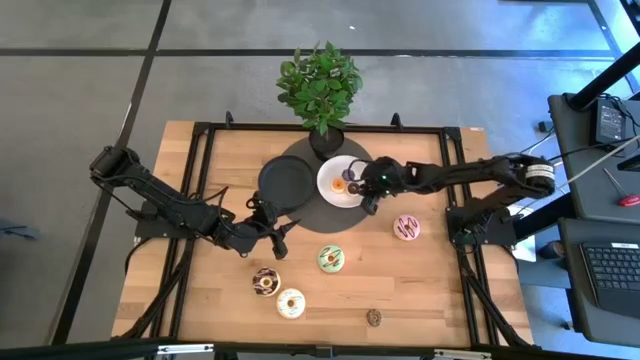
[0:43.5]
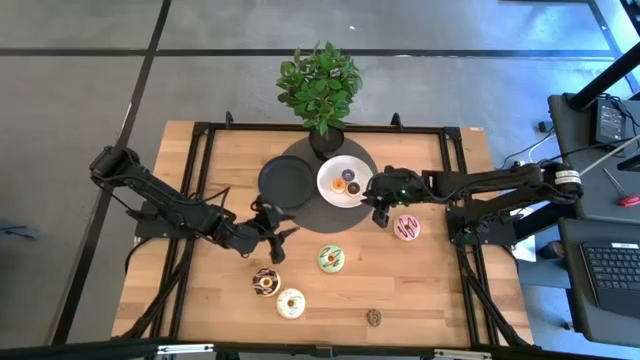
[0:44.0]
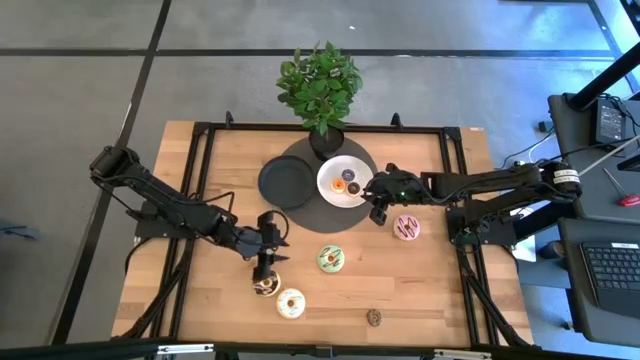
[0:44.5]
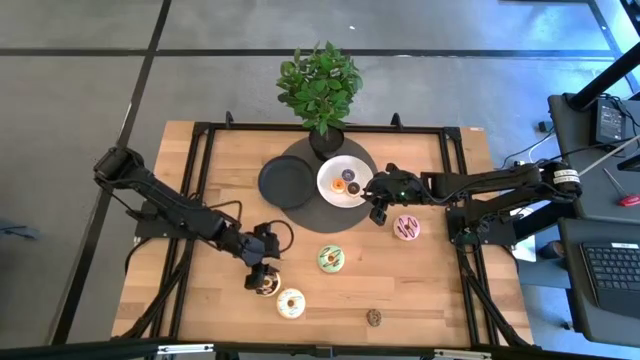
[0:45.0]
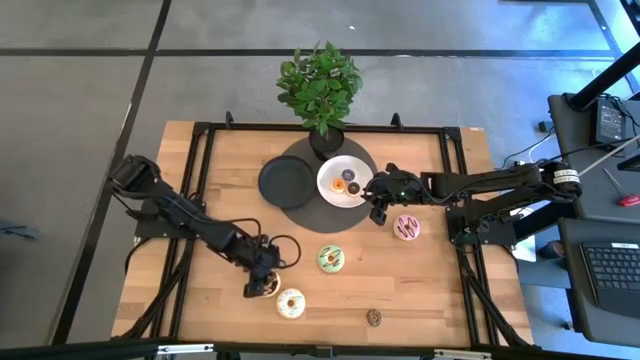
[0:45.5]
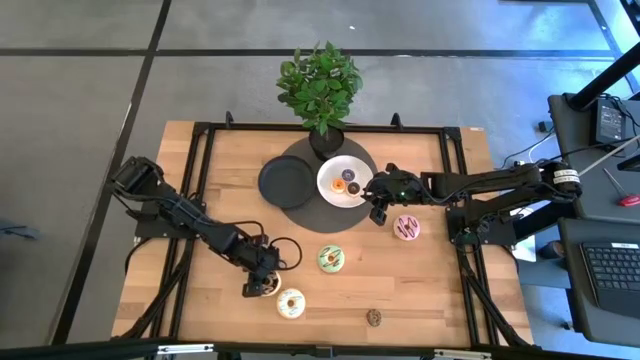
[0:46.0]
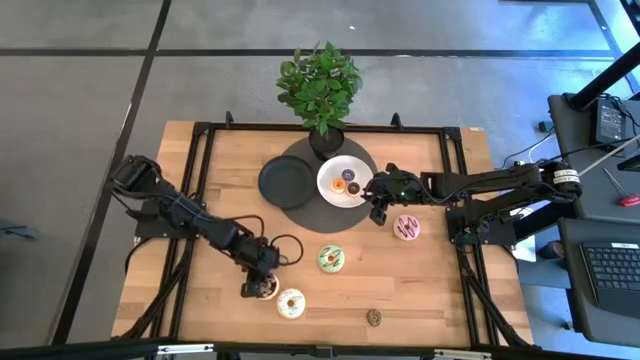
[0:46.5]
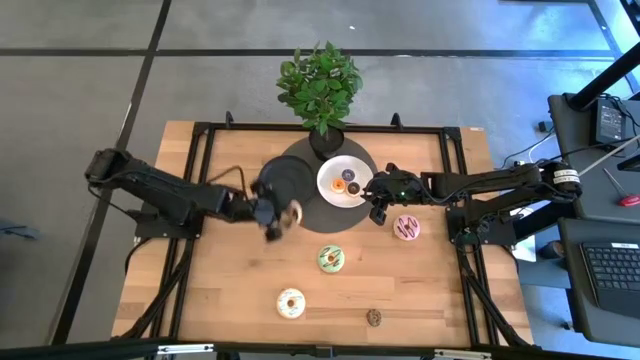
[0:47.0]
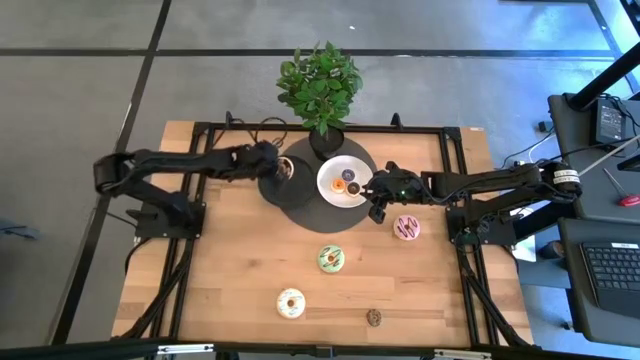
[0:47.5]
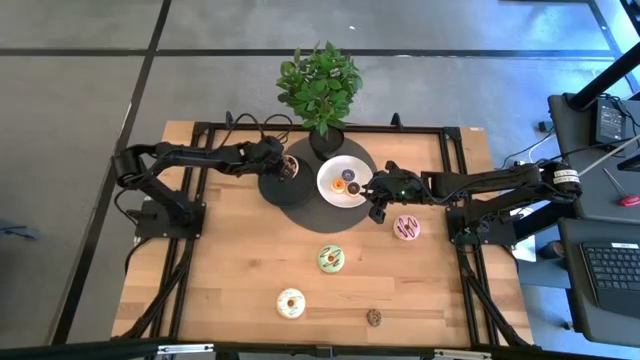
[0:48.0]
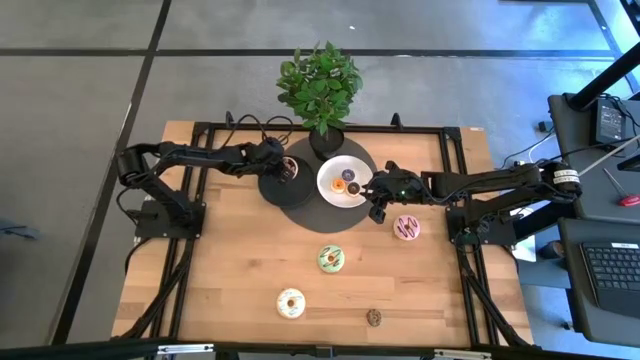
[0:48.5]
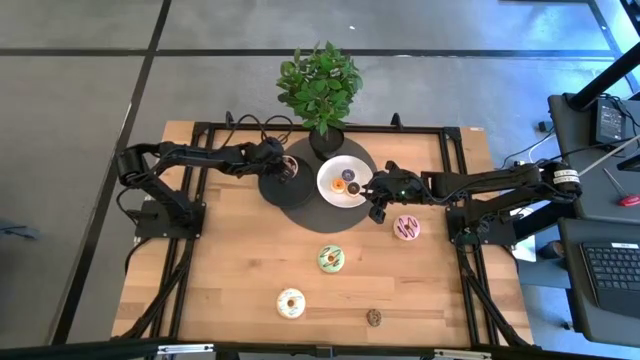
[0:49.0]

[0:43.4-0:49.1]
Task: Pick & Place donuts
Put the big black donut on the green plate

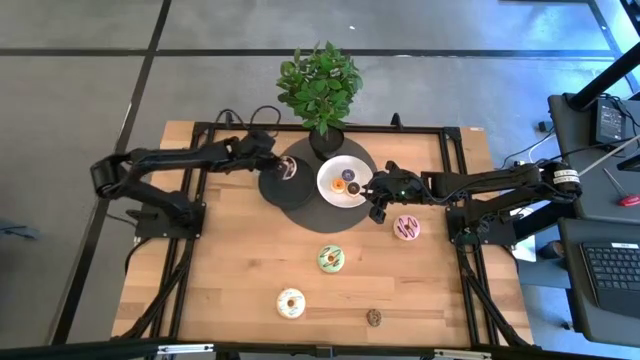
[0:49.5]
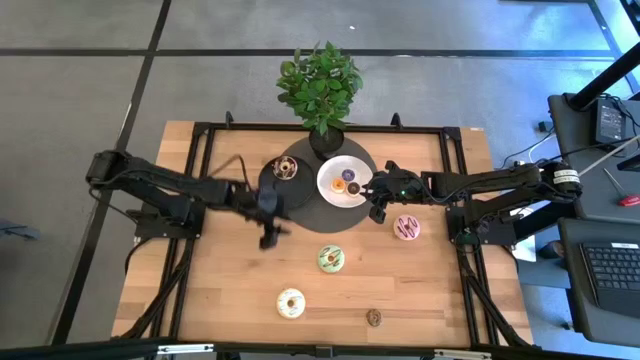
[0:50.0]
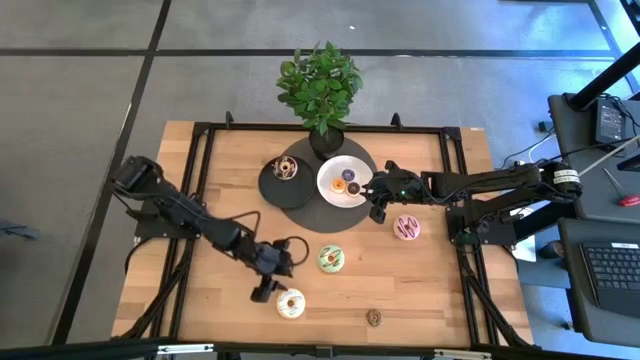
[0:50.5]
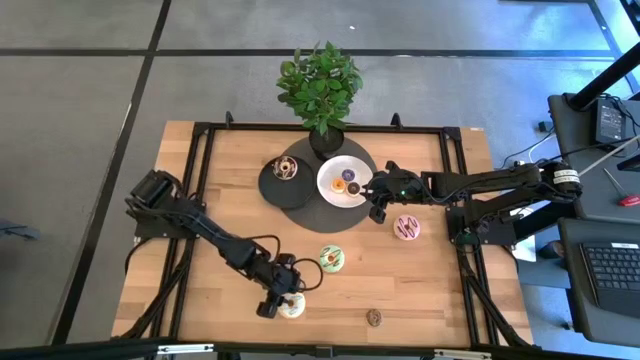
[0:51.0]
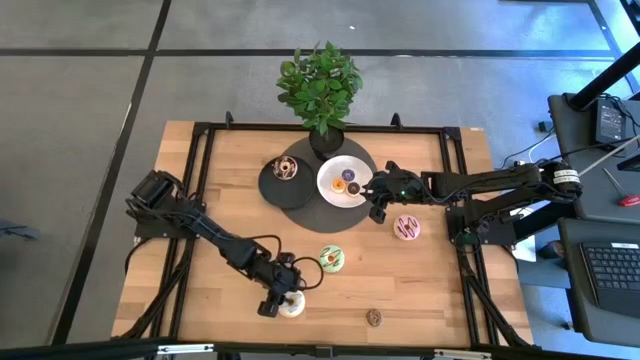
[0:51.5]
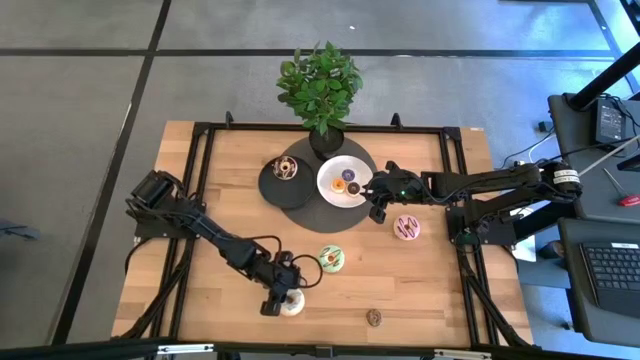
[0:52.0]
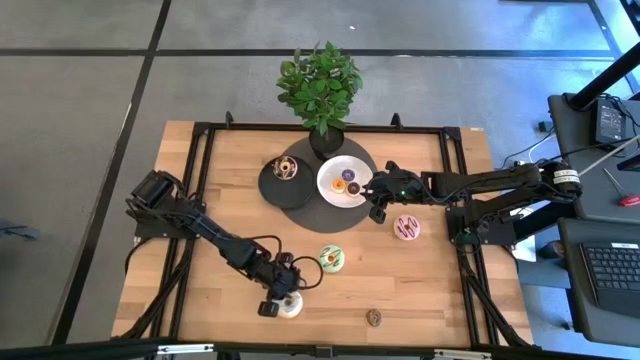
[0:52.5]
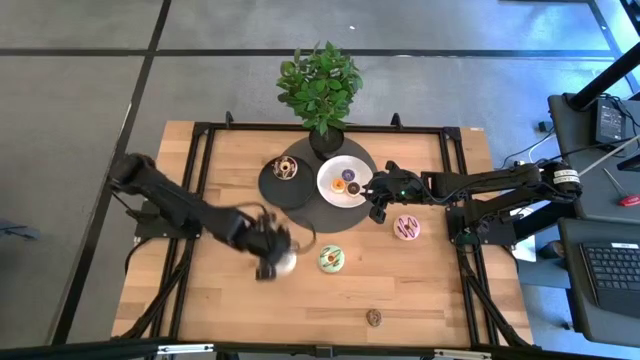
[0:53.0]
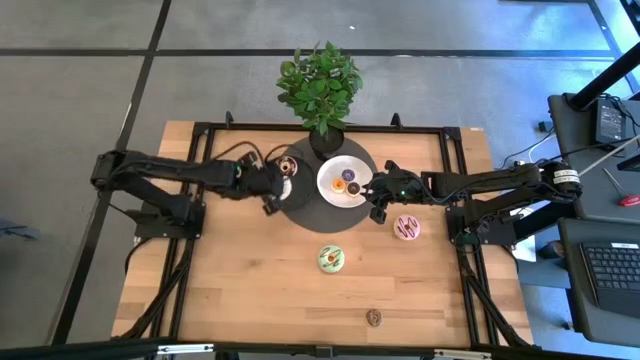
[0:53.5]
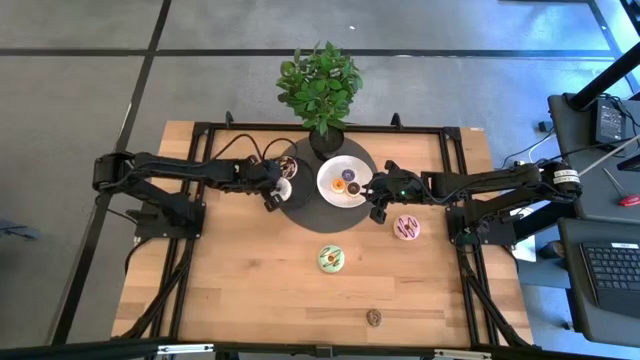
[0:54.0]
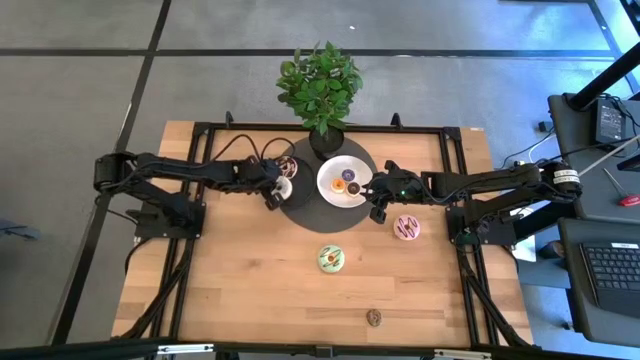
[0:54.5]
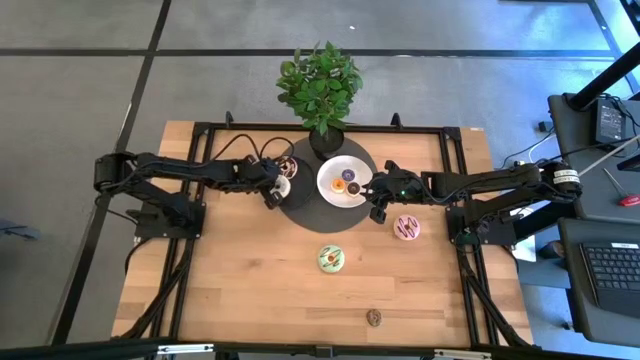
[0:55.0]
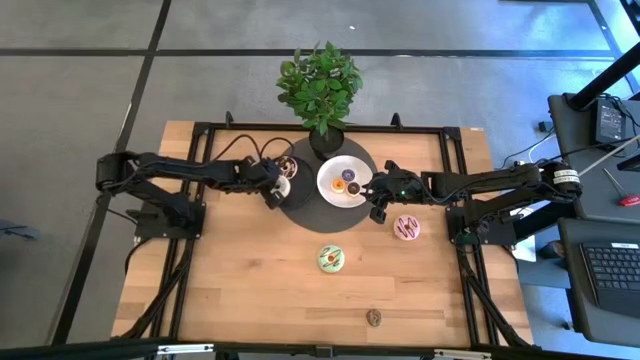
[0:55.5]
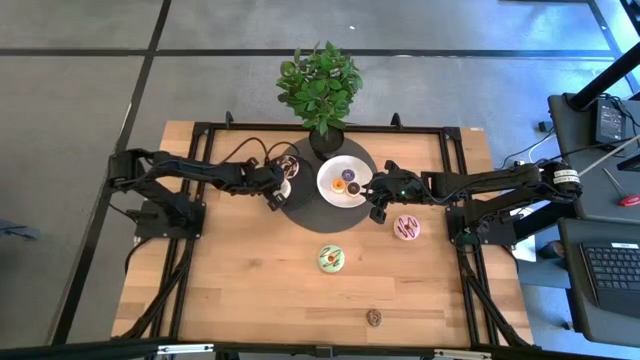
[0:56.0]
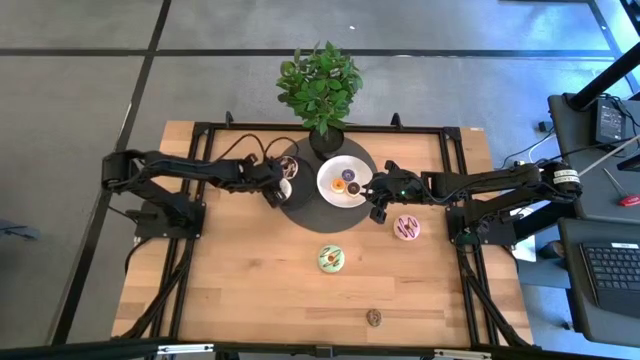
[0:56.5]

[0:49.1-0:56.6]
Put the big white donut on the green plate

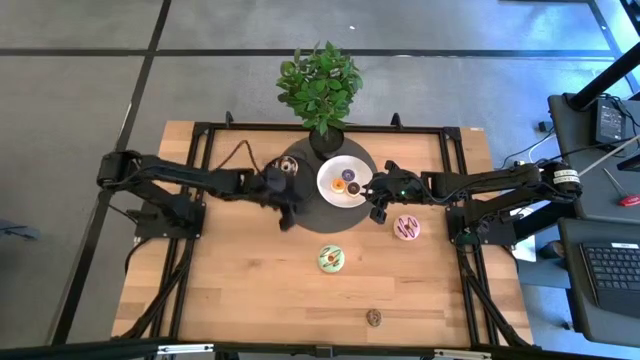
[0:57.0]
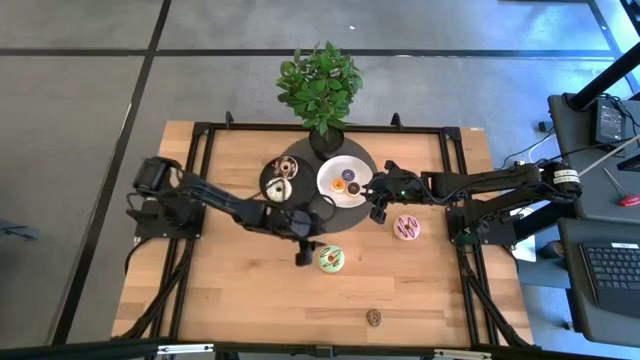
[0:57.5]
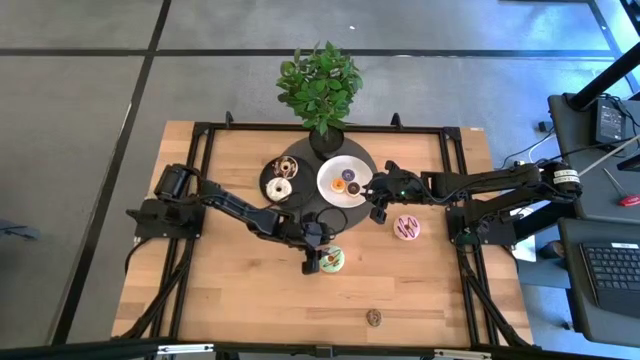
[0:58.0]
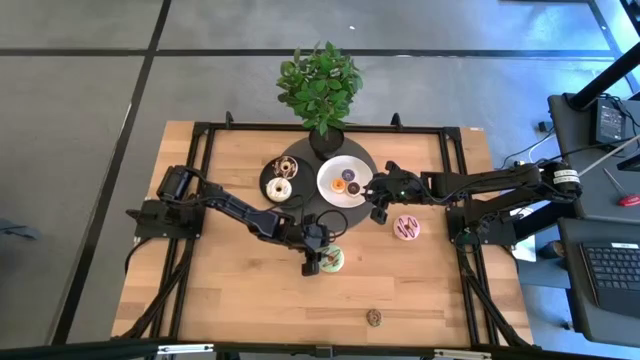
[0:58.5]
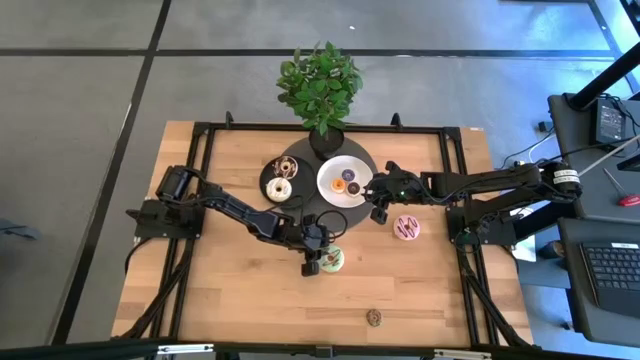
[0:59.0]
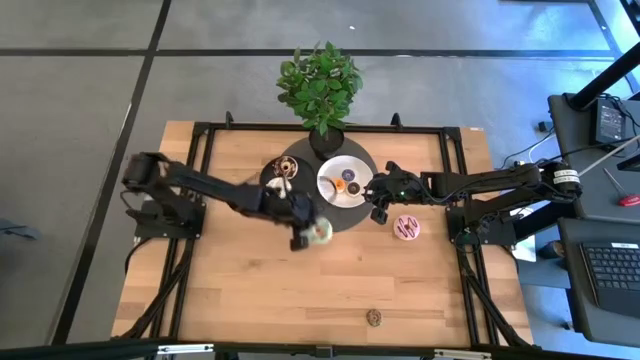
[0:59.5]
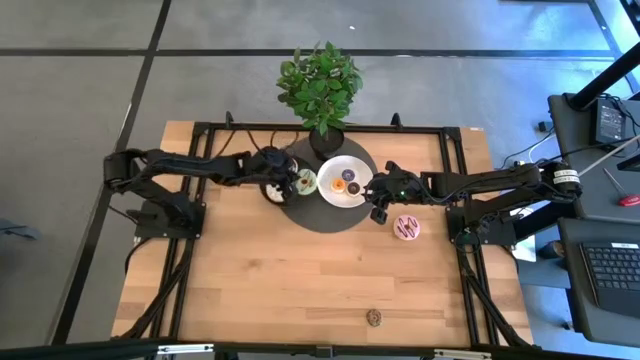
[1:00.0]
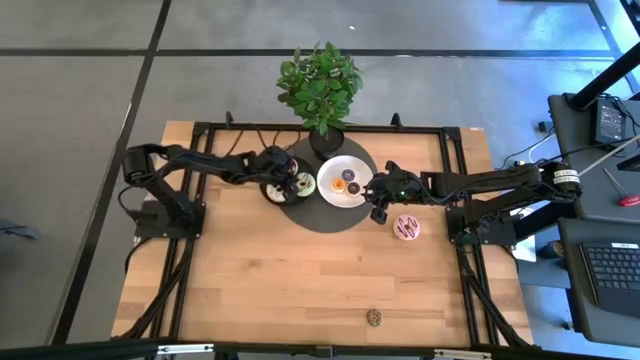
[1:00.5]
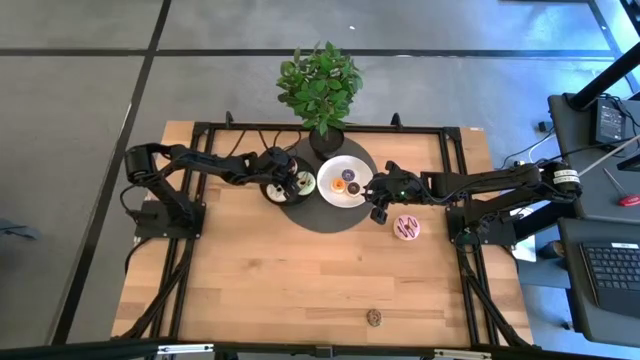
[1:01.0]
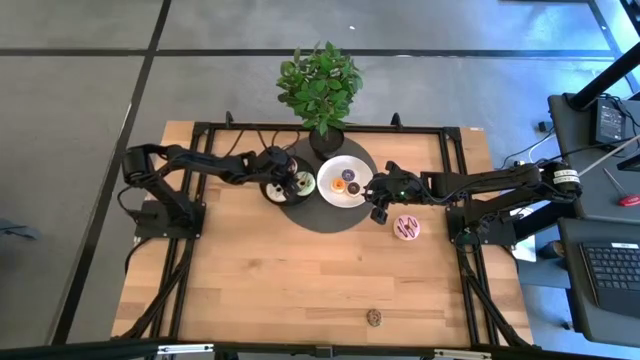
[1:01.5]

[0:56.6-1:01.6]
Put the big light blue donut on the dark green plate

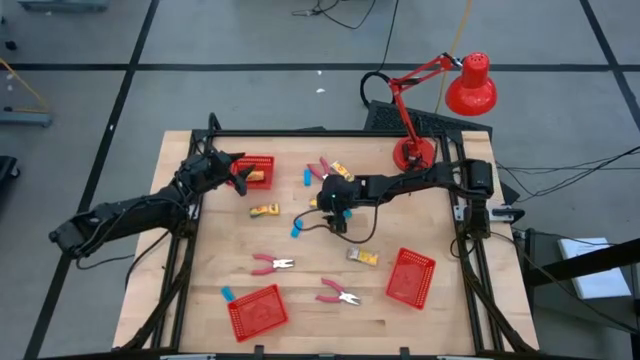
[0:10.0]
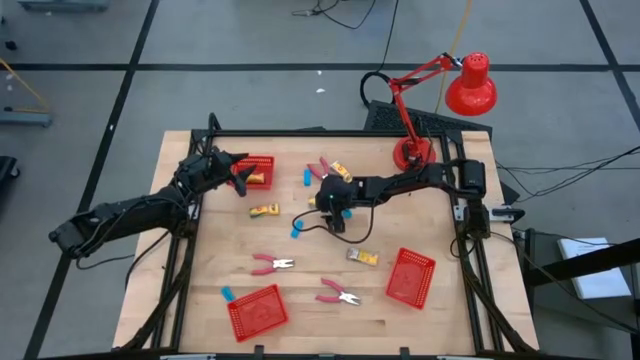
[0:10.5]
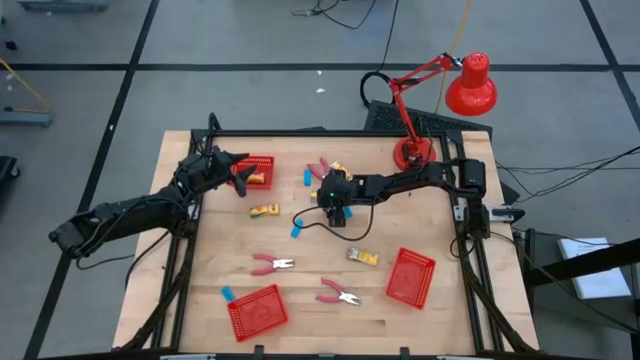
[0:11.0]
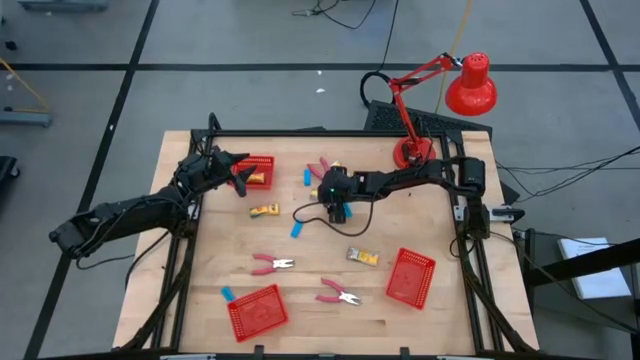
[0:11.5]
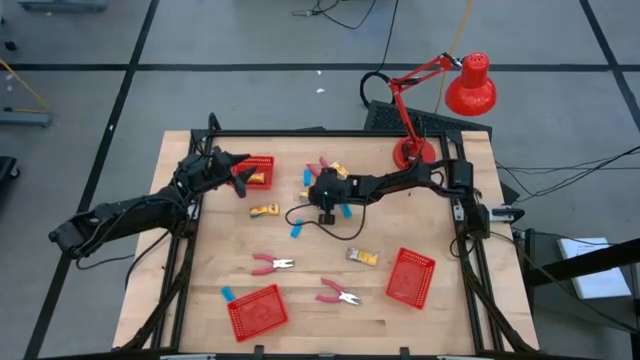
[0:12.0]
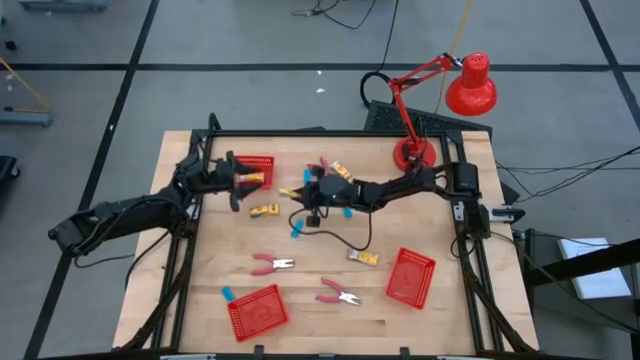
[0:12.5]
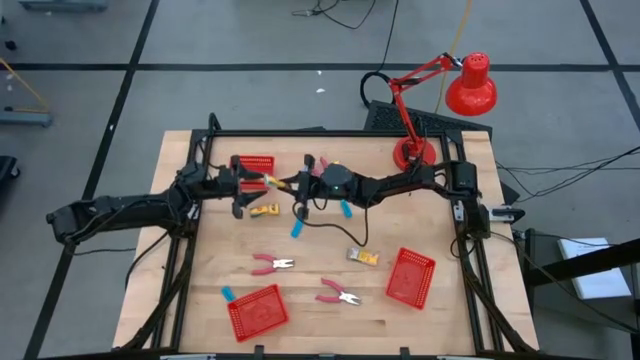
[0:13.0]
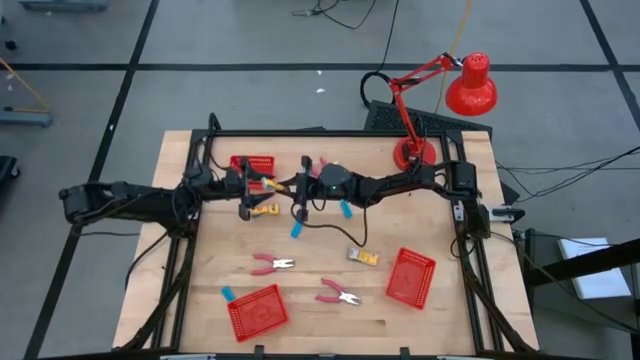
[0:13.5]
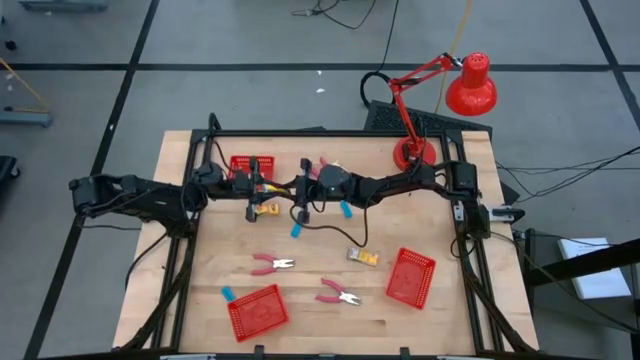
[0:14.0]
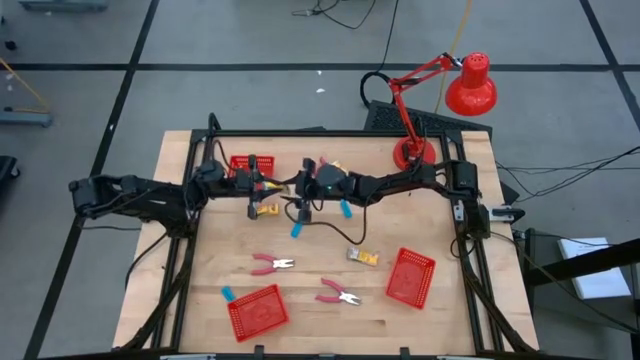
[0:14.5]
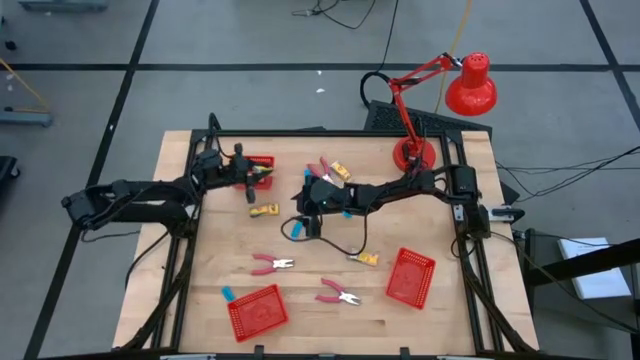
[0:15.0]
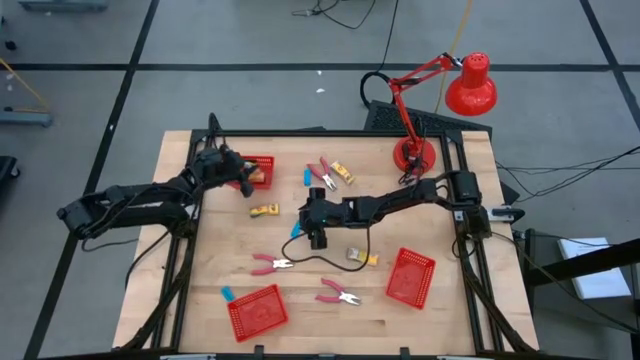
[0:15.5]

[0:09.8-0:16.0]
Task: Pick & Place School Supplies
Put the yellow crayon box into the top red basket
